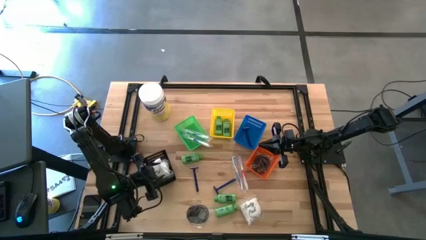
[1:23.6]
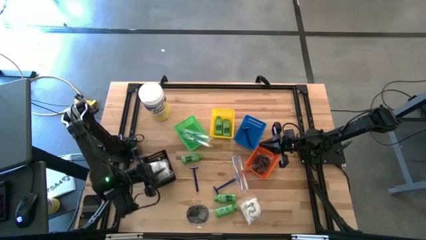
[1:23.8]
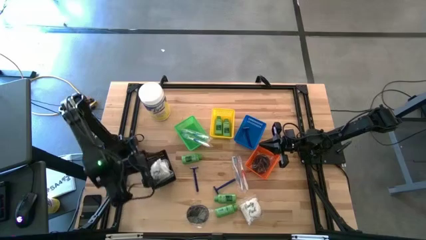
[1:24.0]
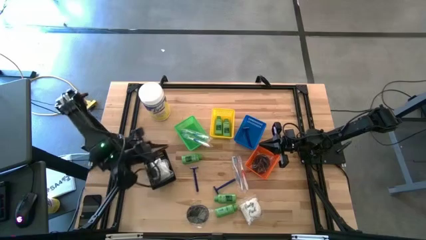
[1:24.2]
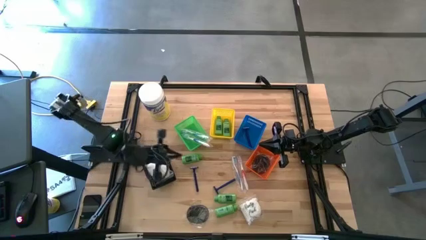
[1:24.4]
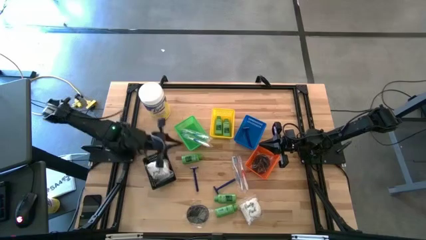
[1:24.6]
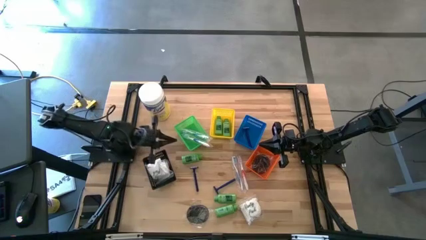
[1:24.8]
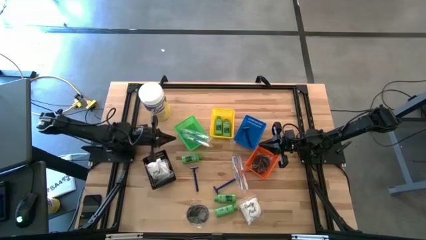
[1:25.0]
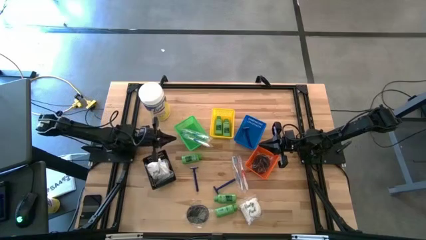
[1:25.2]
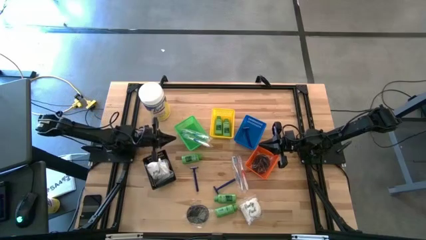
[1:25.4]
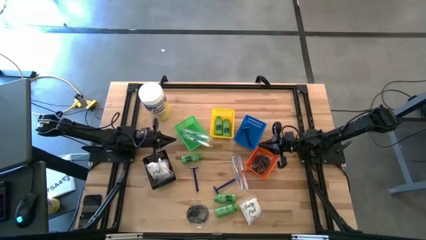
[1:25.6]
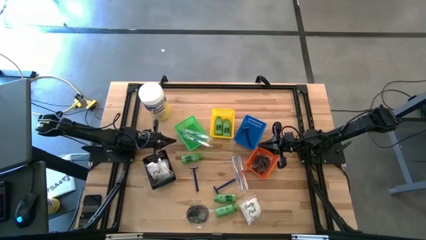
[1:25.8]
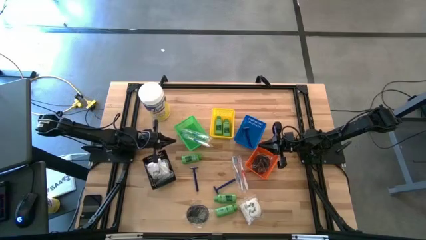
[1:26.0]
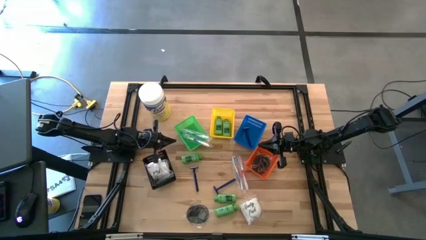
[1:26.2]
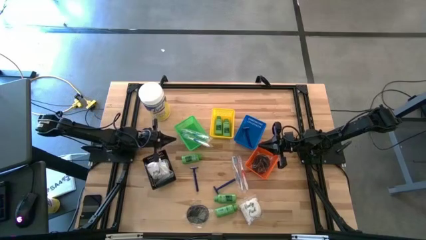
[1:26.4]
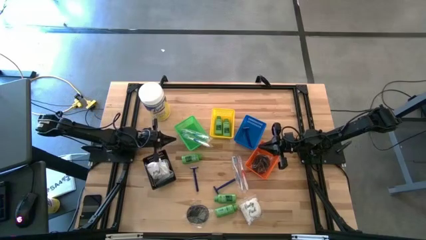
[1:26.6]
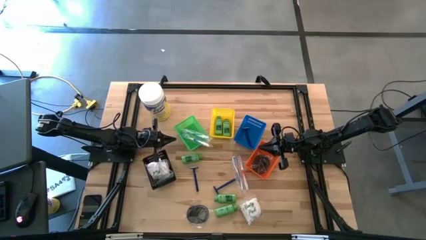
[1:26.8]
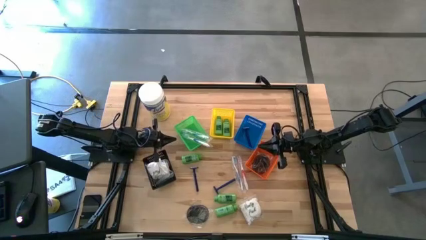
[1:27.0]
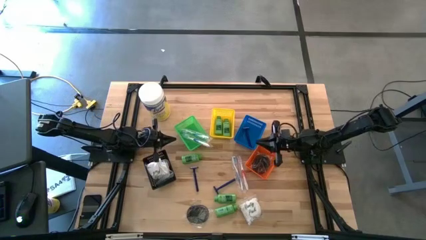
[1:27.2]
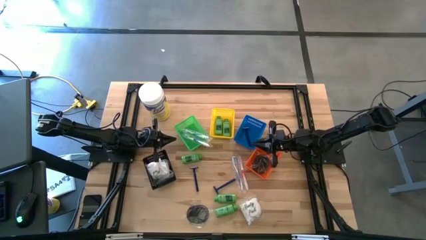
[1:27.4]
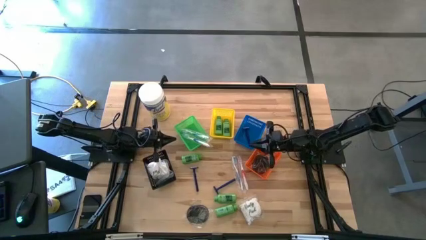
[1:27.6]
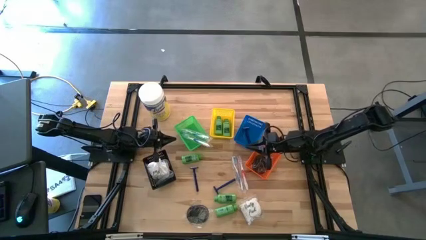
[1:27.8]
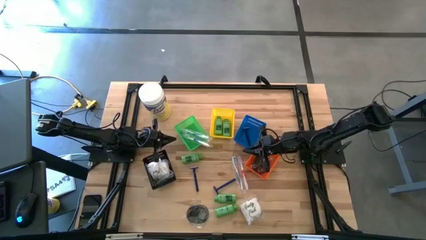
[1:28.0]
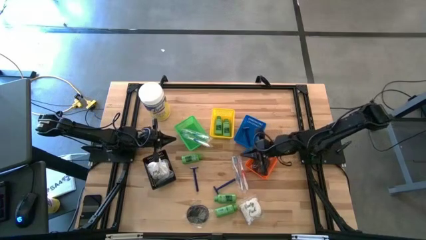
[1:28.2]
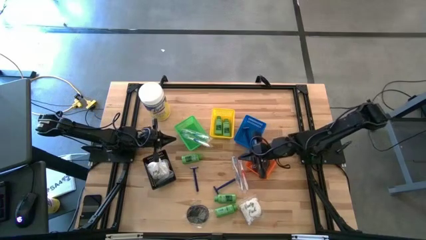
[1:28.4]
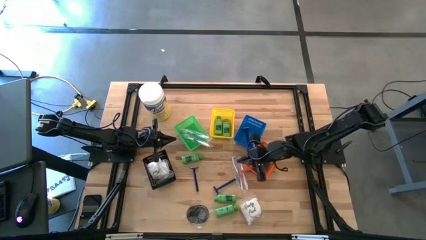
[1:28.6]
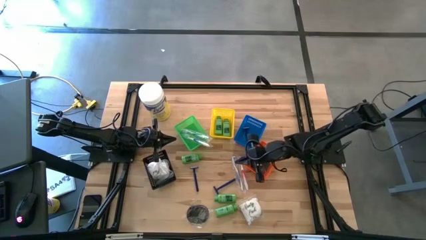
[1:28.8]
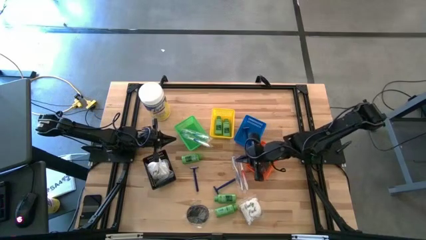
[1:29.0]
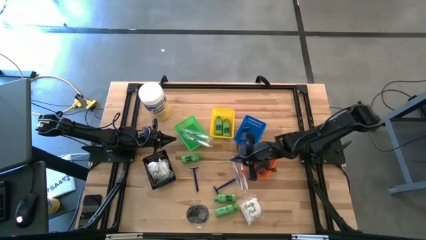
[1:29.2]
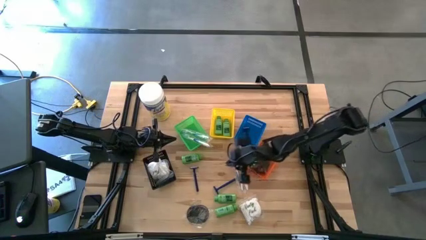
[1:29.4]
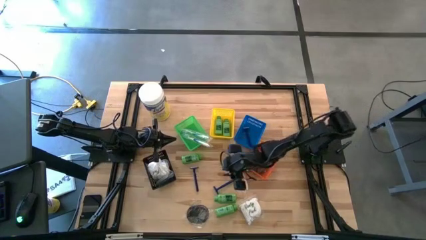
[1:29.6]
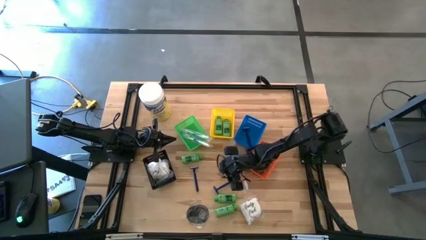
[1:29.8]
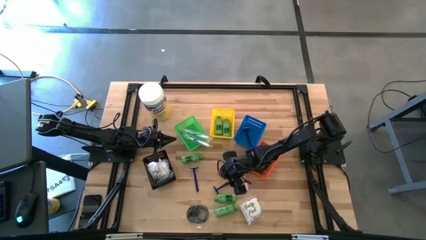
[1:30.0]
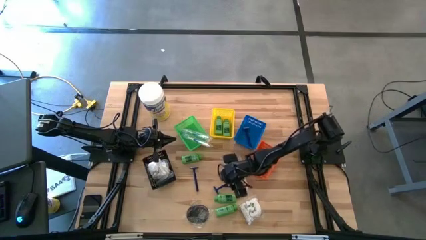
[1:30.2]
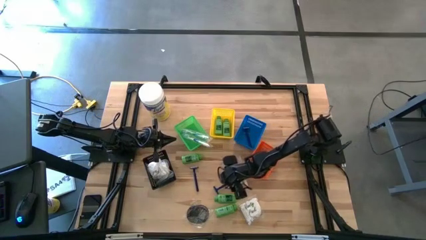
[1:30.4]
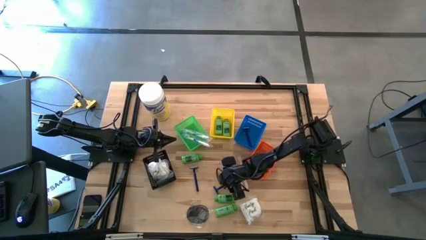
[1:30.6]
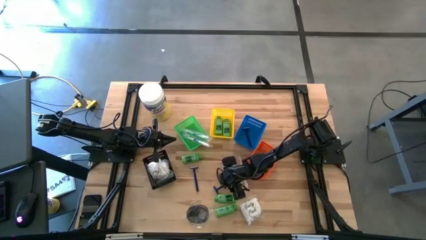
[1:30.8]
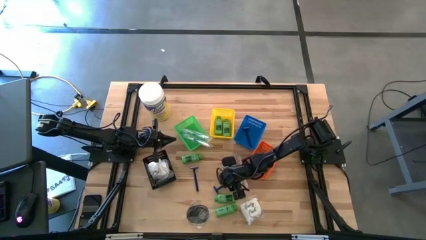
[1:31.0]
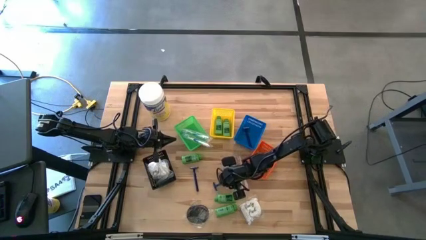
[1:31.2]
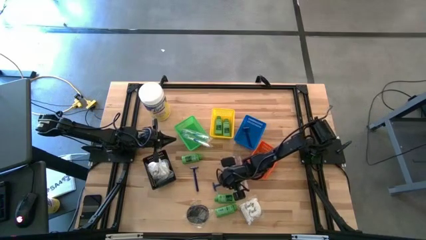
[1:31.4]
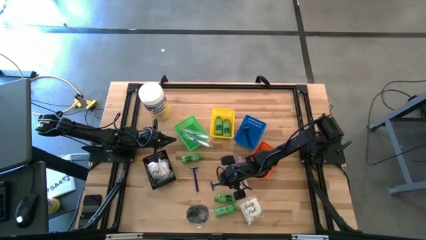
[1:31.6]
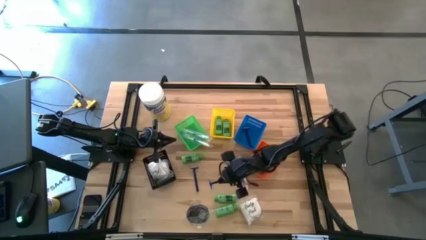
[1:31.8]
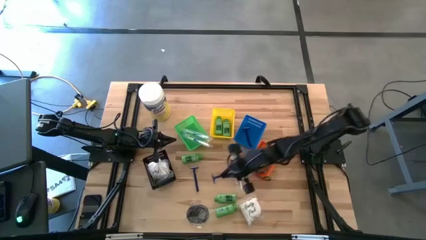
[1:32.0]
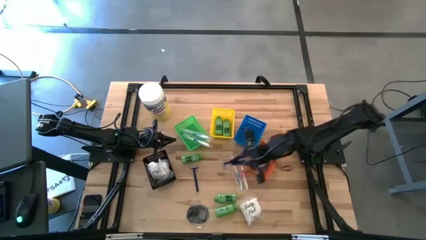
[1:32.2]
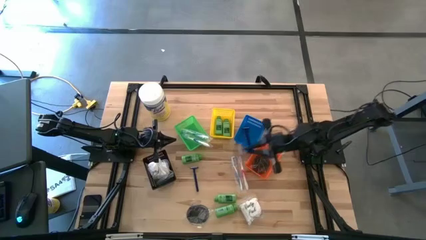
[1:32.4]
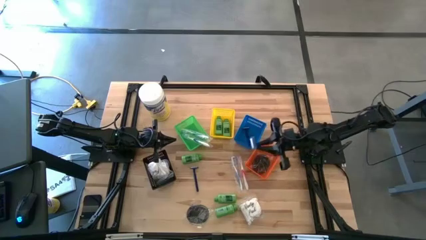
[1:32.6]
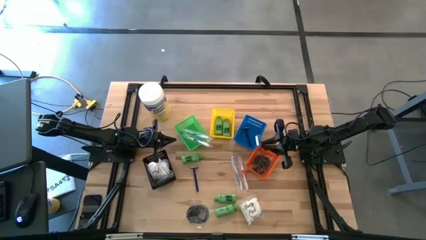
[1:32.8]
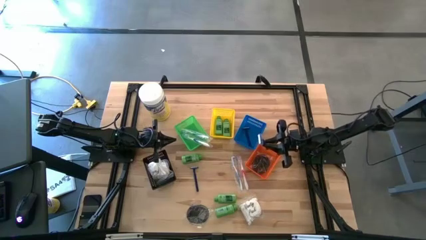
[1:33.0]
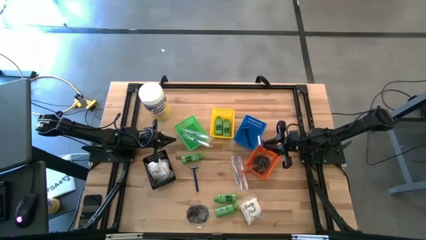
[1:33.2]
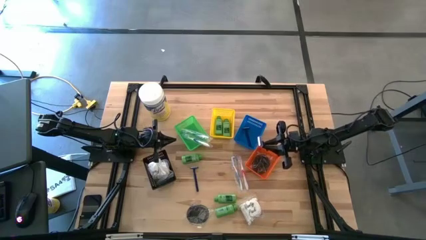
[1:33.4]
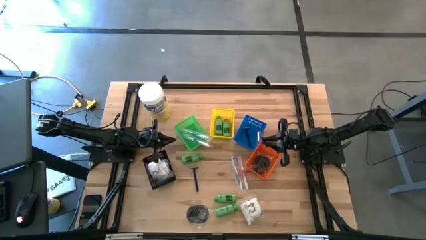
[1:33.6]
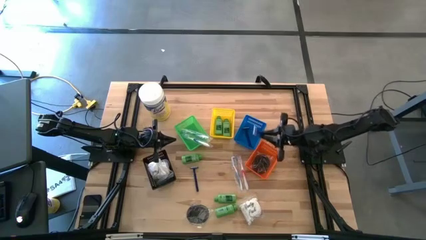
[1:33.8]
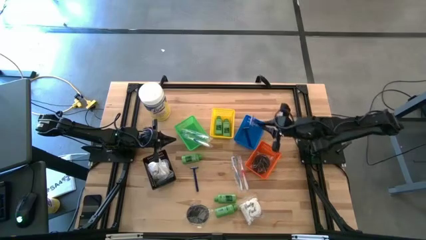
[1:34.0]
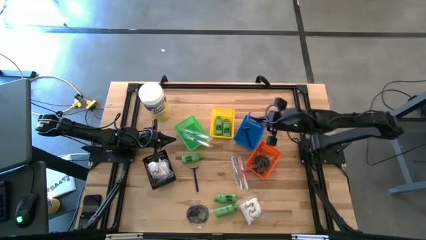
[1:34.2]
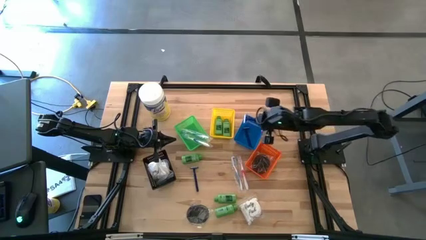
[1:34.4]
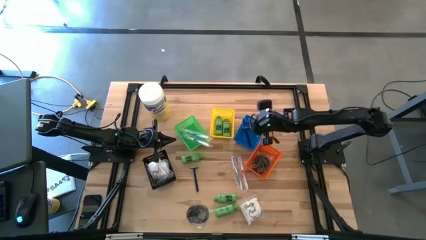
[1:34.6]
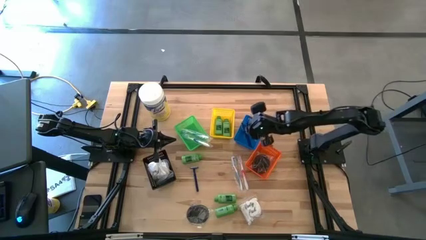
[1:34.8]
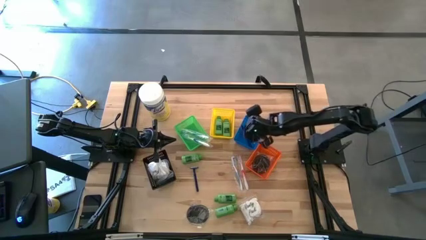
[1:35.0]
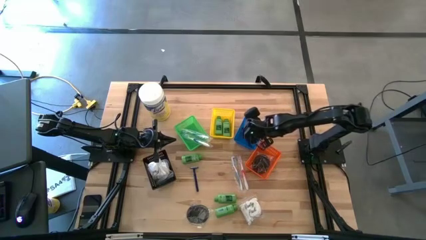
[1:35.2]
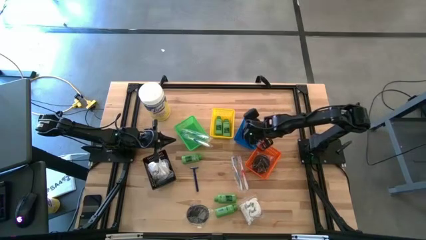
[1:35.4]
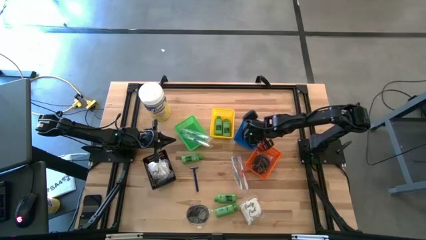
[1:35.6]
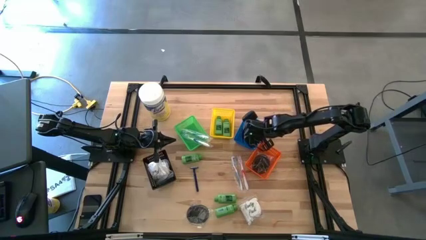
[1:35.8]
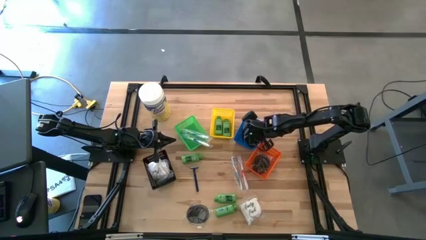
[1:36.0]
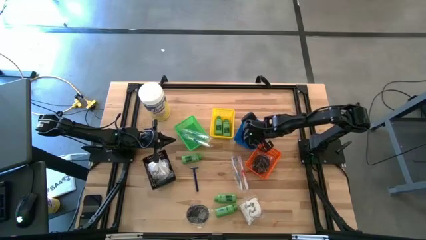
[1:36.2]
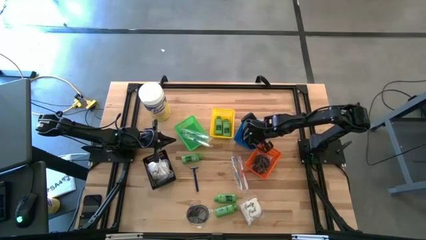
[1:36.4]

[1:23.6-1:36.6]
Task: Pick & Place Travel size toiletries
Put the razor into the blue bin
